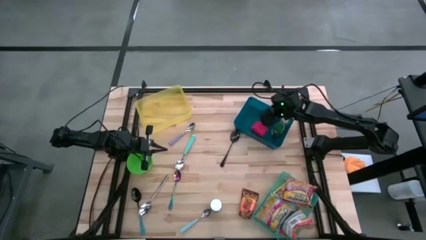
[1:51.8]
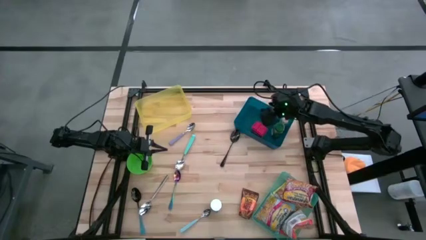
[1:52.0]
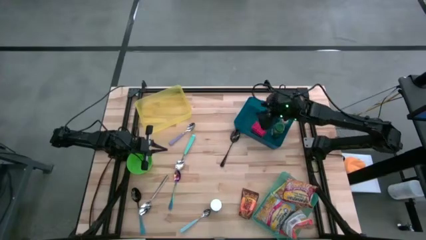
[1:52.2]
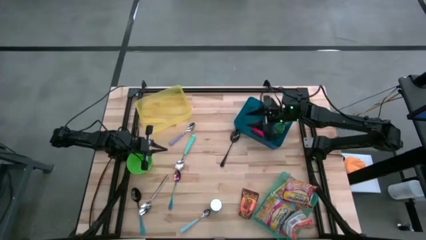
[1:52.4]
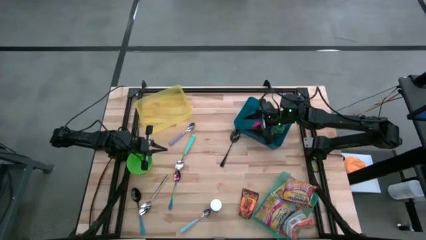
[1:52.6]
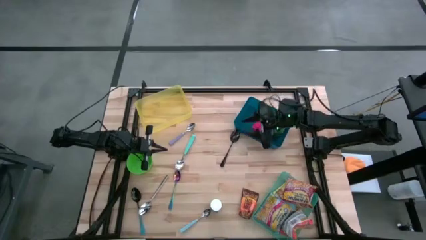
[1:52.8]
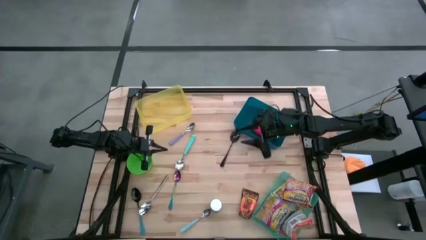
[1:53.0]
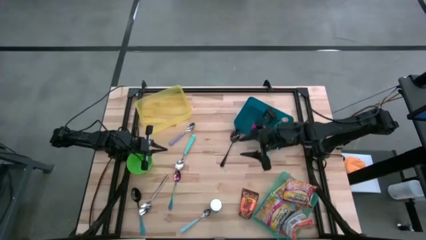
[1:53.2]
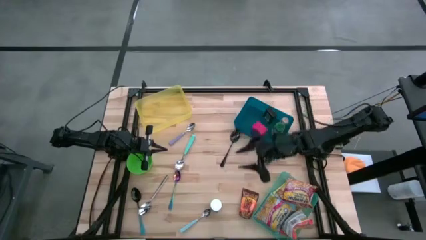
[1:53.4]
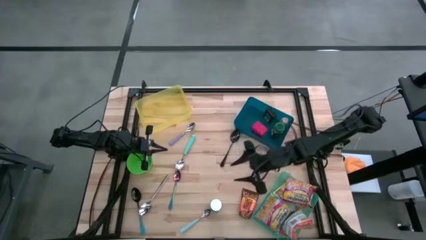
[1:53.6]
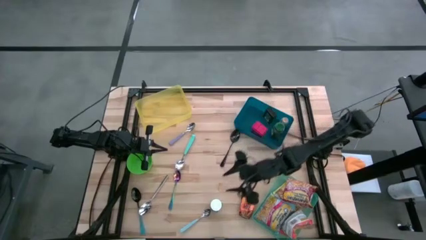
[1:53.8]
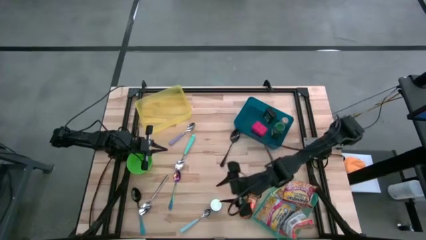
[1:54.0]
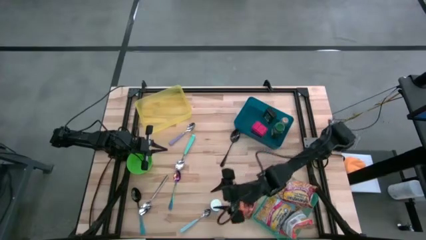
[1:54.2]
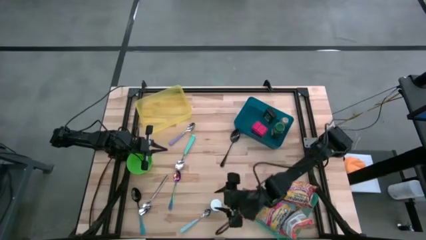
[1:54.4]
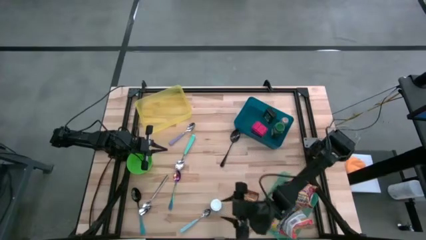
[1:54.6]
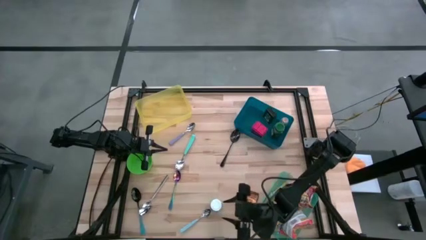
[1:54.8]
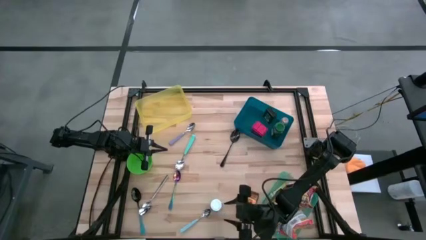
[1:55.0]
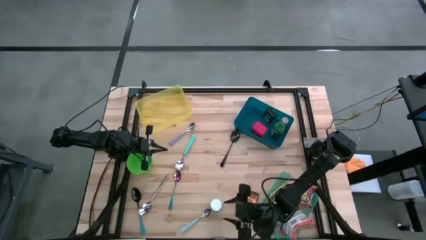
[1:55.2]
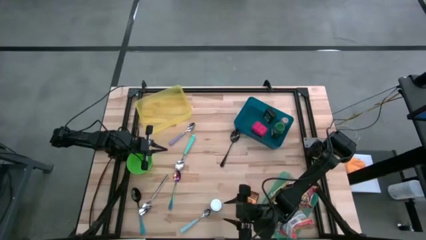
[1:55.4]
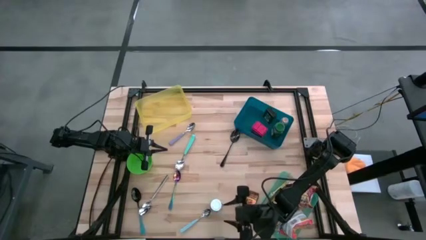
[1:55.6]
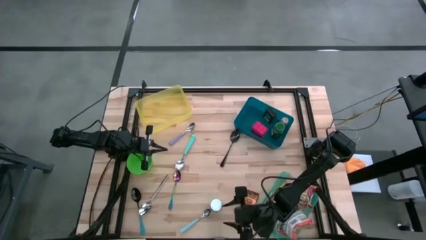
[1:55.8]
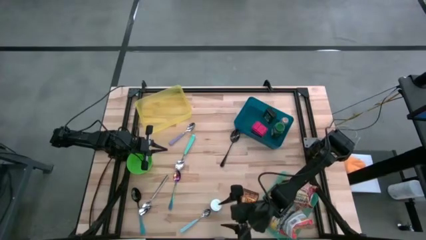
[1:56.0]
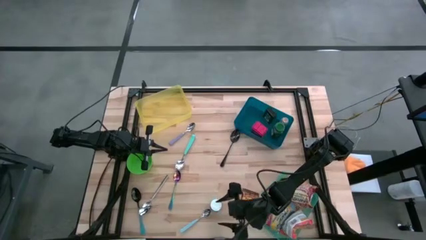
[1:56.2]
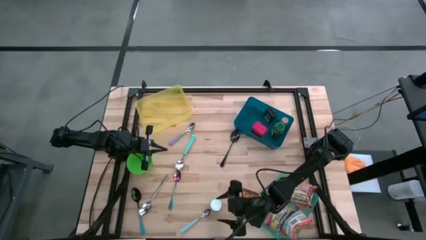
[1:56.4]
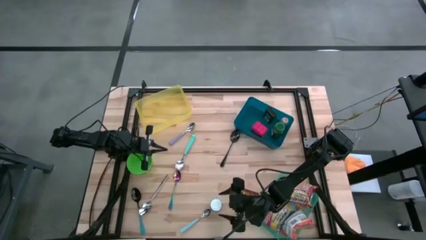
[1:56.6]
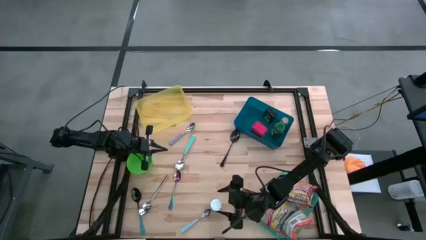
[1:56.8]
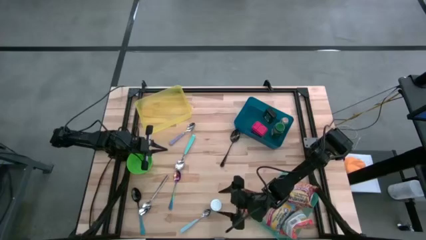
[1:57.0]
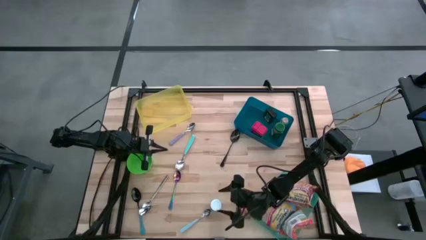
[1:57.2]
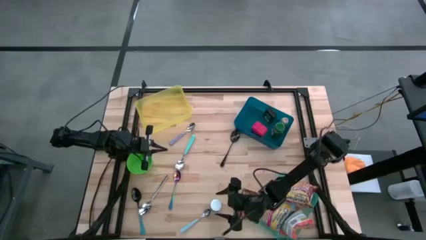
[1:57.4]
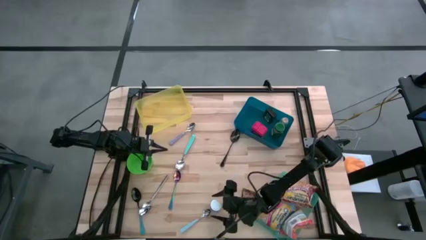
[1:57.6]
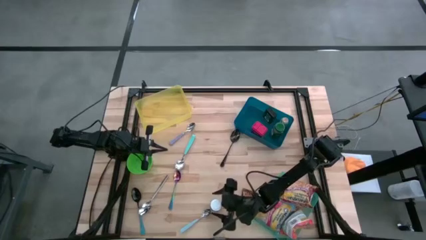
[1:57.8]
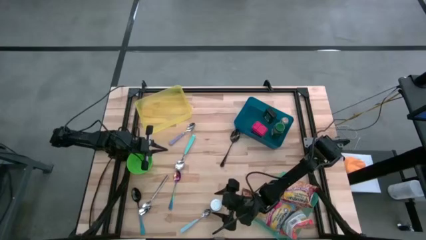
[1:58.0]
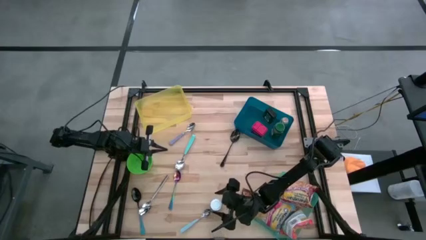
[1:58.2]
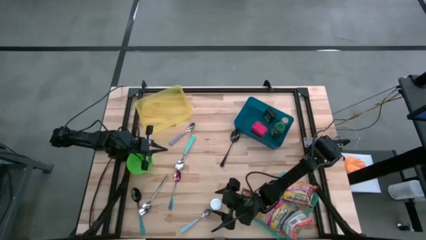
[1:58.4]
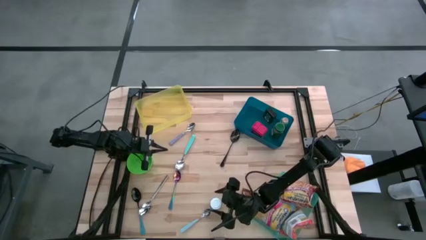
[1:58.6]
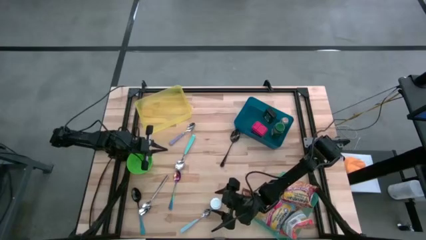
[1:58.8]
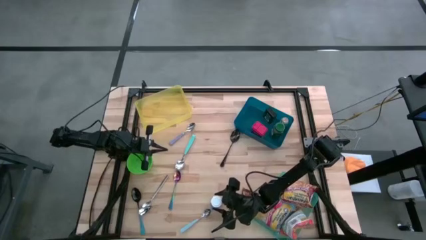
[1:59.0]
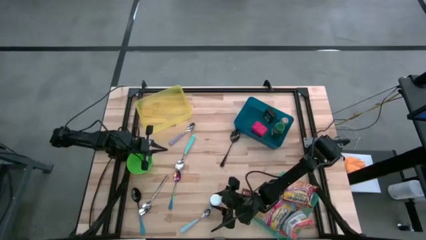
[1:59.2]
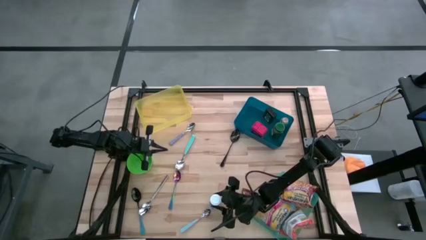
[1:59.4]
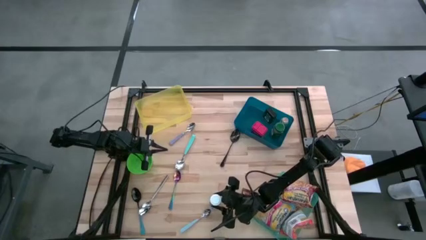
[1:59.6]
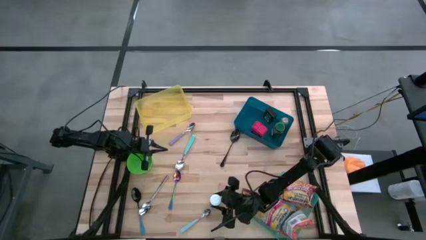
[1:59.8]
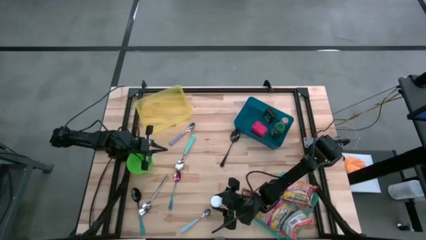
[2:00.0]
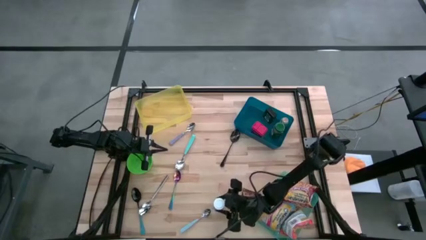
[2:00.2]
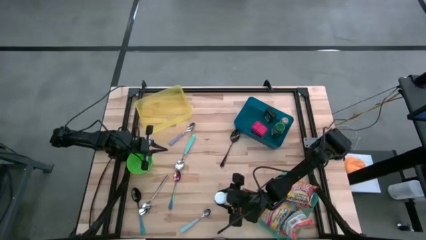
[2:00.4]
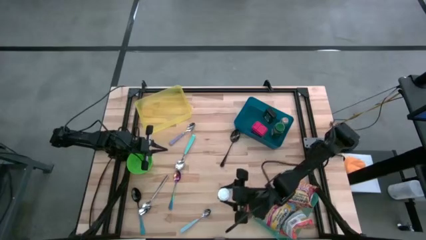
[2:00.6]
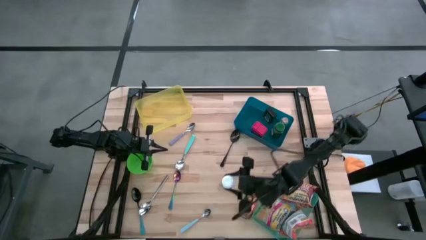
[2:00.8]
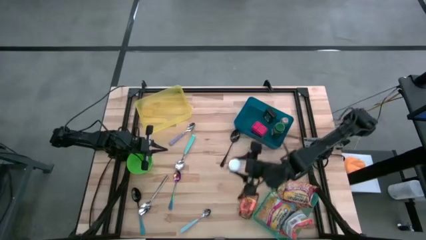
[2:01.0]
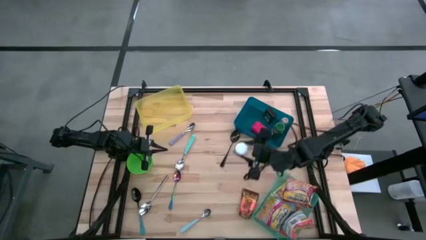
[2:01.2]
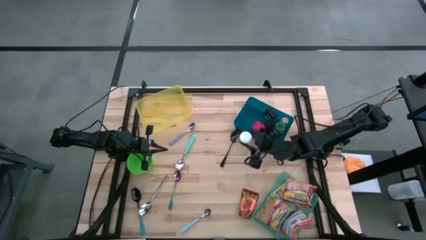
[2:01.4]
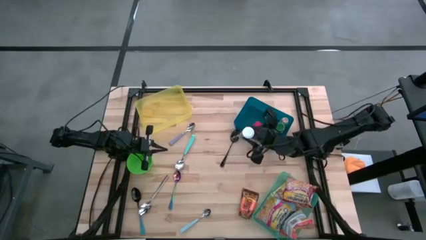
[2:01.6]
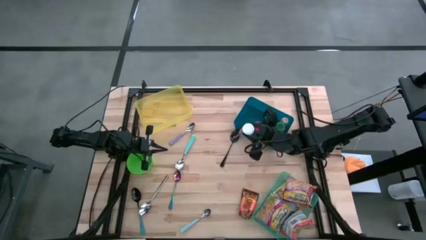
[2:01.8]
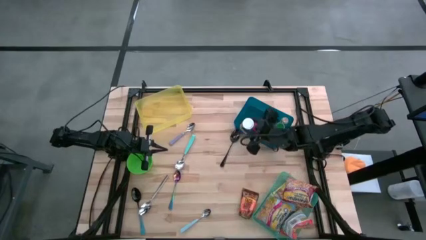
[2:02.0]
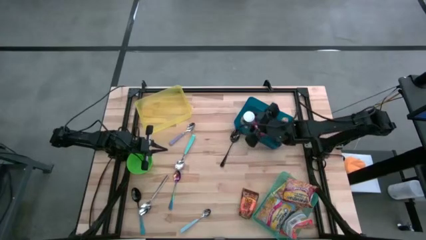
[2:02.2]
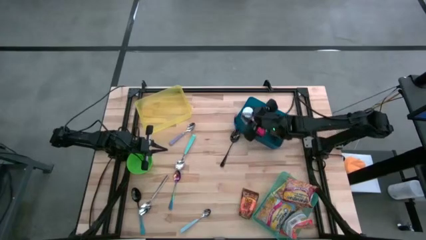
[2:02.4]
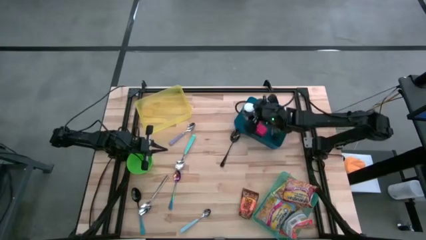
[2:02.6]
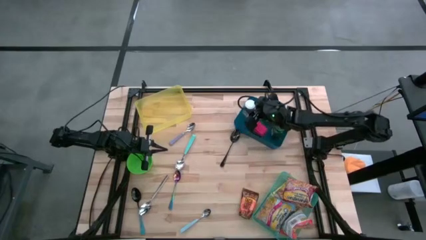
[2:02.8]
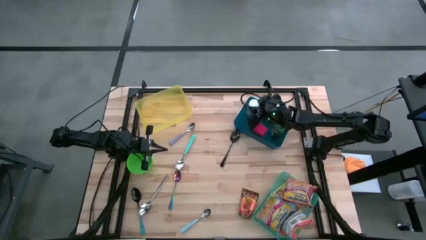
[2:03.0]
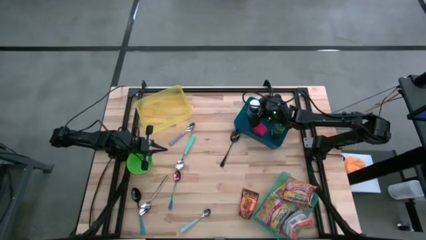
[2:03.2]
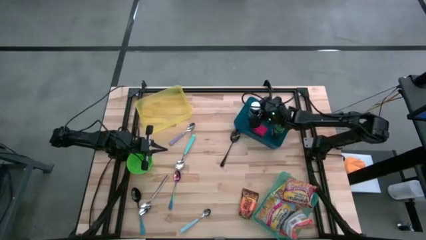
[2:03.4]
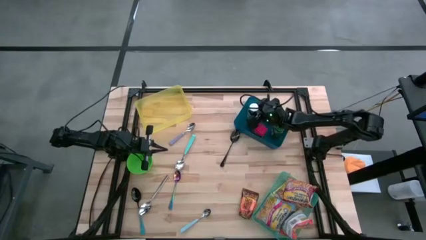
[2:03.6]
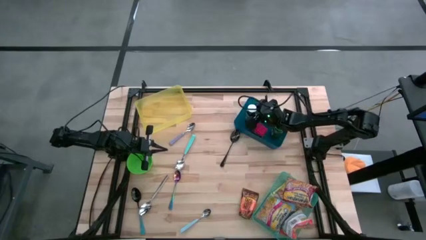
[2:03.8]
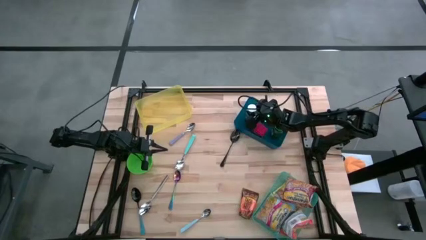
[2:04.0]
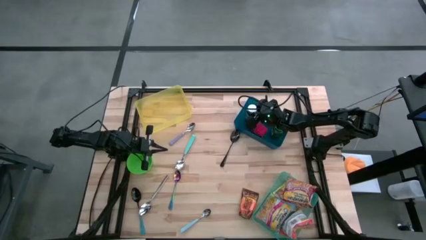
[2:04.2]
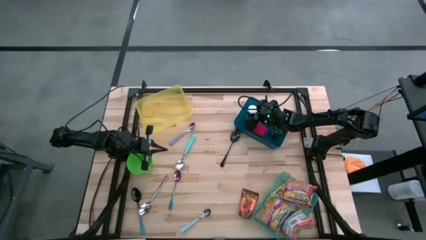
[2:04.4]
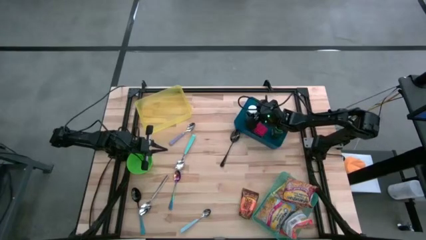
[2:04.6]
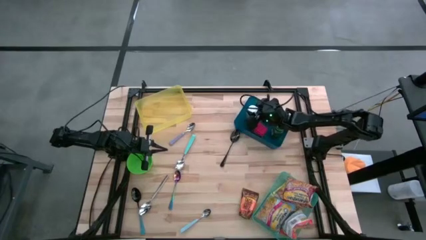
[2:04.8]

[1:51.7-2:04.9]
Put the white seasoning bottle into the blue bin
